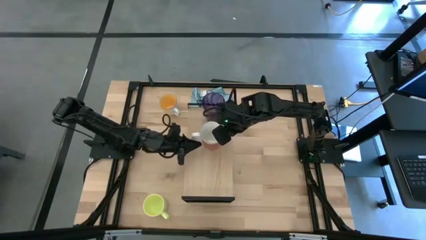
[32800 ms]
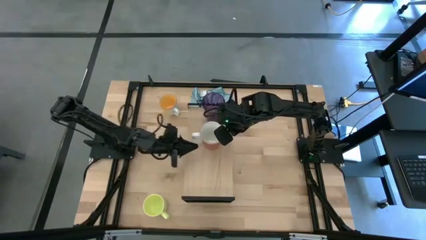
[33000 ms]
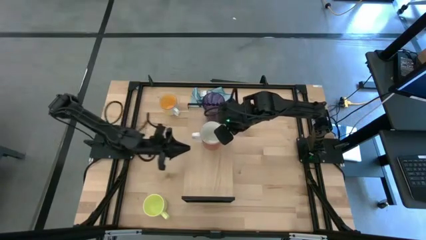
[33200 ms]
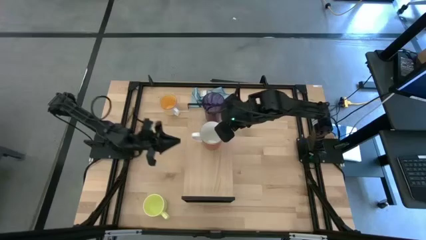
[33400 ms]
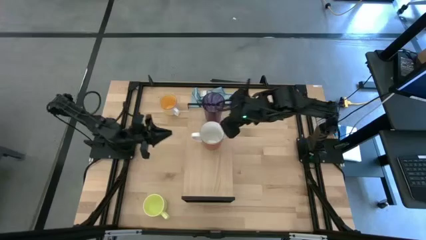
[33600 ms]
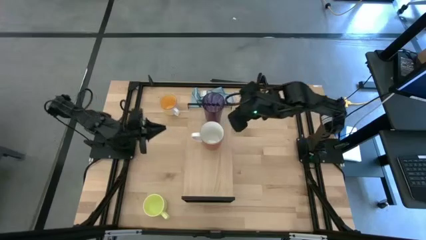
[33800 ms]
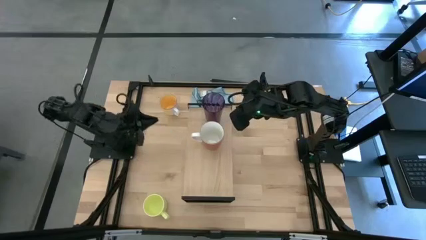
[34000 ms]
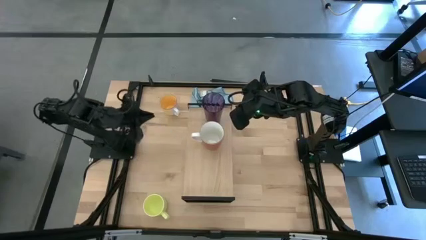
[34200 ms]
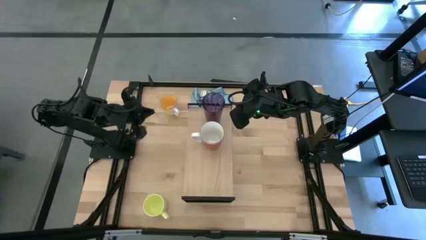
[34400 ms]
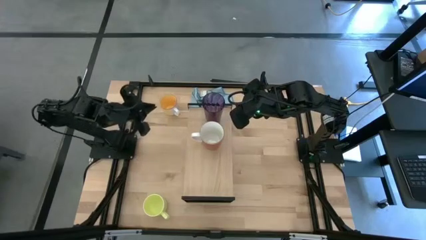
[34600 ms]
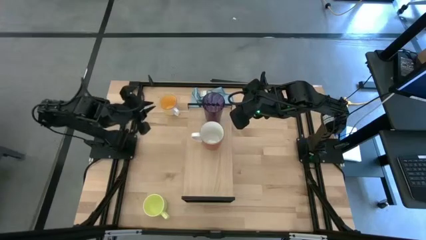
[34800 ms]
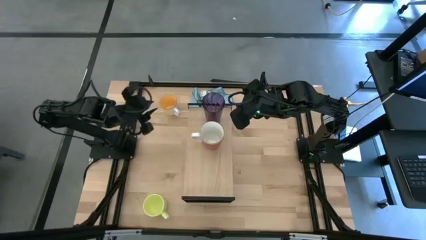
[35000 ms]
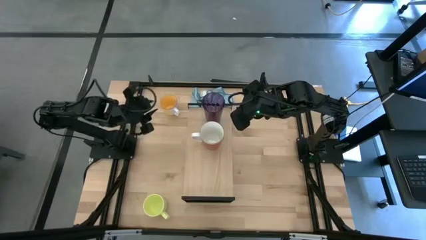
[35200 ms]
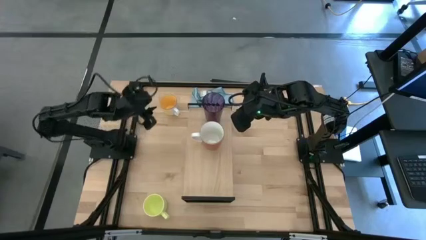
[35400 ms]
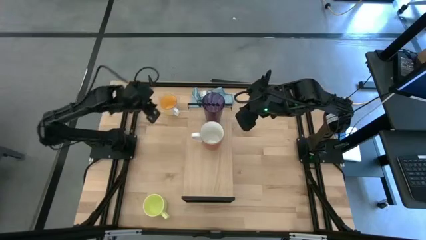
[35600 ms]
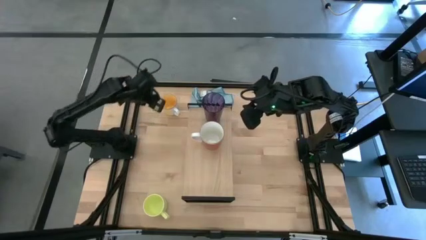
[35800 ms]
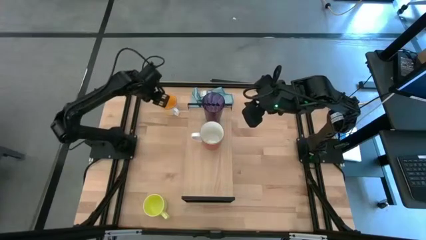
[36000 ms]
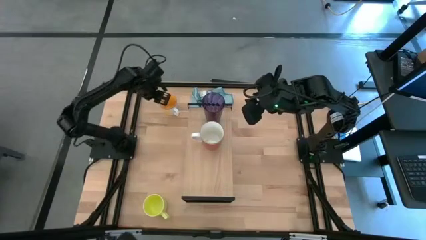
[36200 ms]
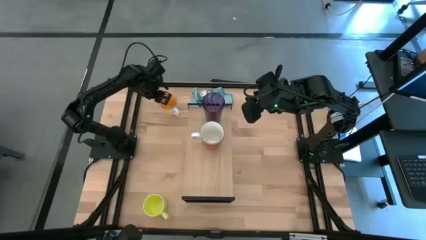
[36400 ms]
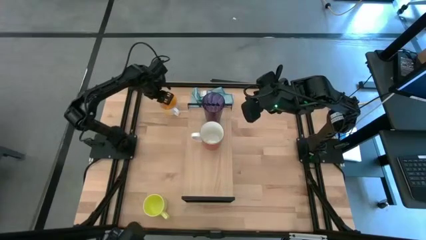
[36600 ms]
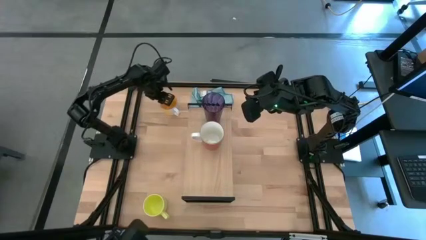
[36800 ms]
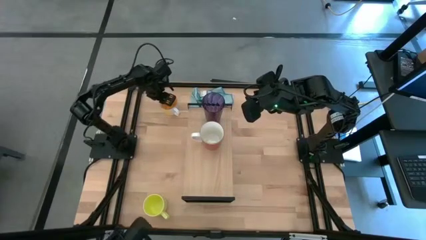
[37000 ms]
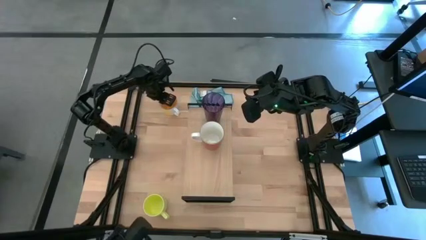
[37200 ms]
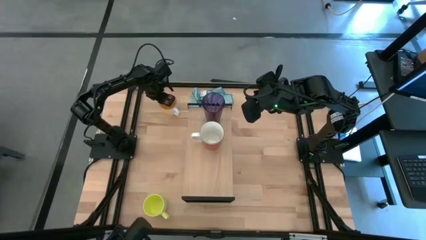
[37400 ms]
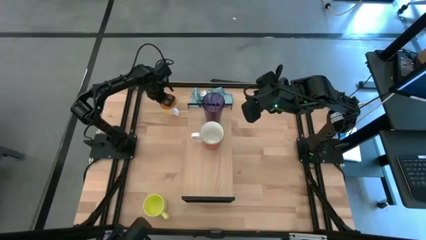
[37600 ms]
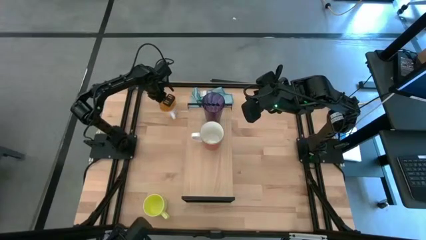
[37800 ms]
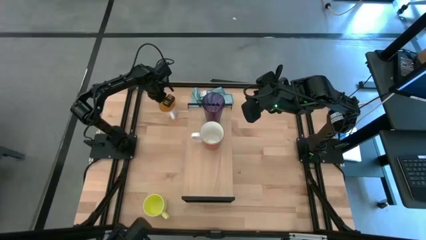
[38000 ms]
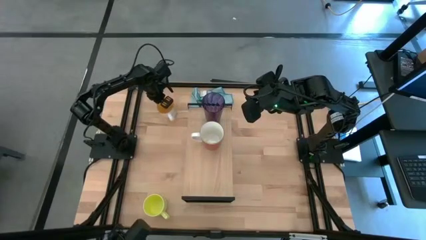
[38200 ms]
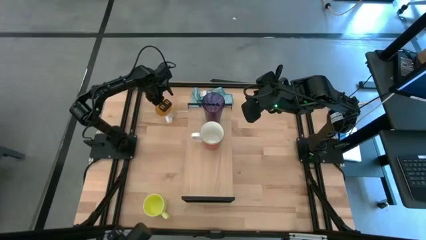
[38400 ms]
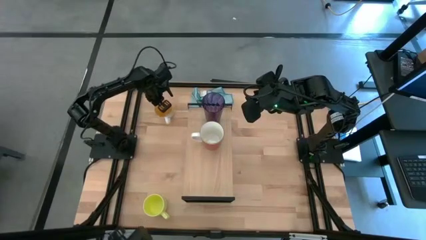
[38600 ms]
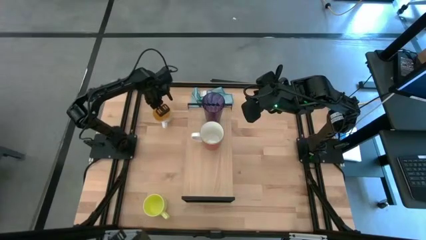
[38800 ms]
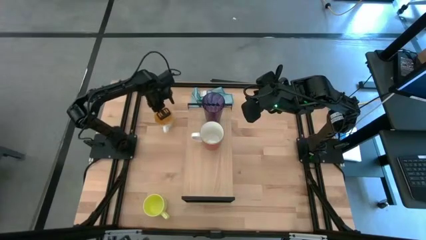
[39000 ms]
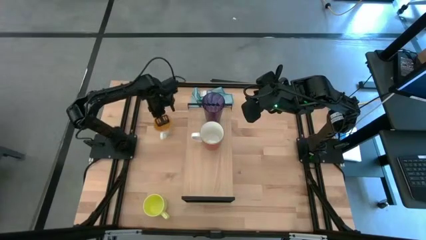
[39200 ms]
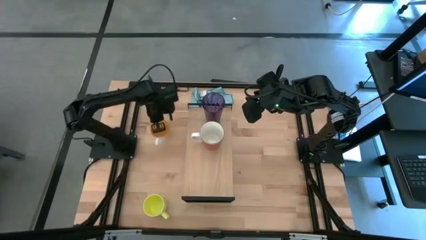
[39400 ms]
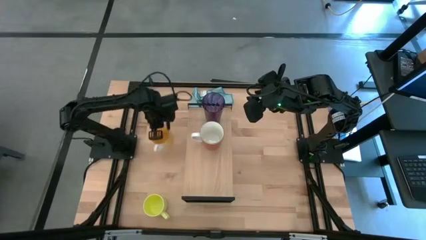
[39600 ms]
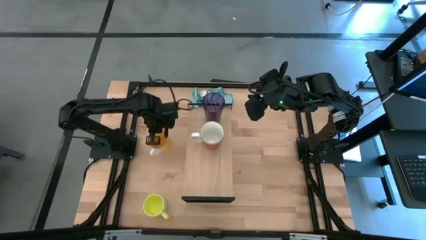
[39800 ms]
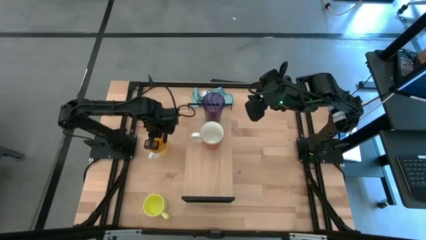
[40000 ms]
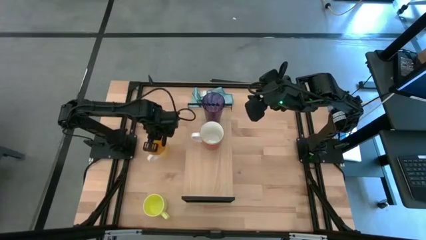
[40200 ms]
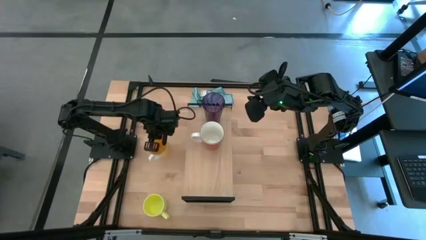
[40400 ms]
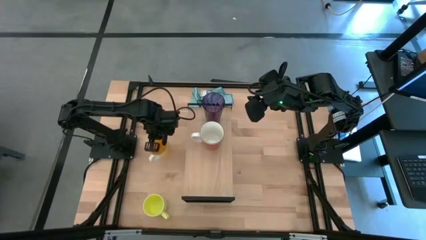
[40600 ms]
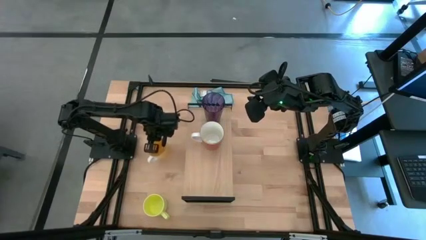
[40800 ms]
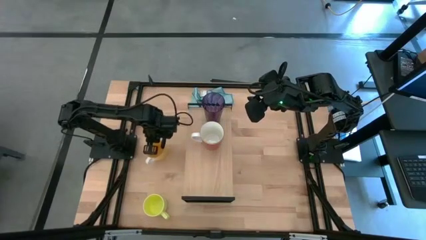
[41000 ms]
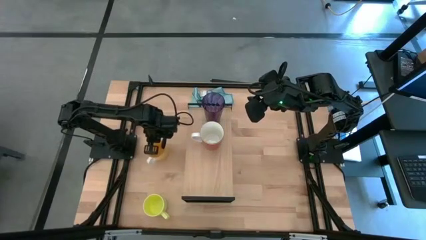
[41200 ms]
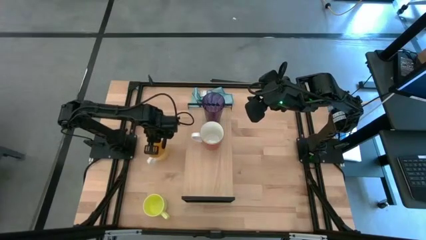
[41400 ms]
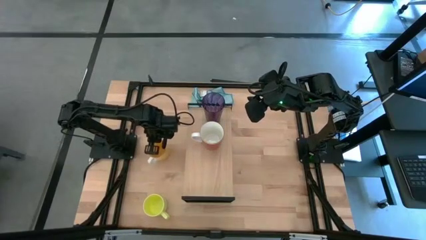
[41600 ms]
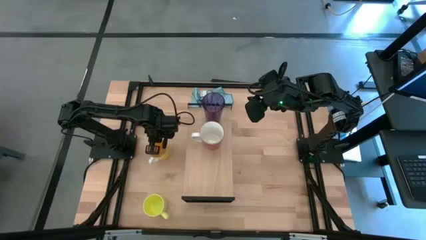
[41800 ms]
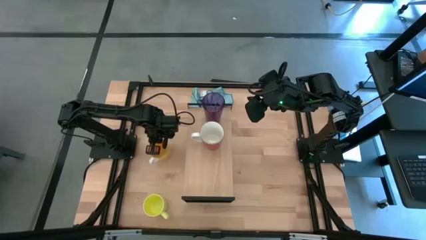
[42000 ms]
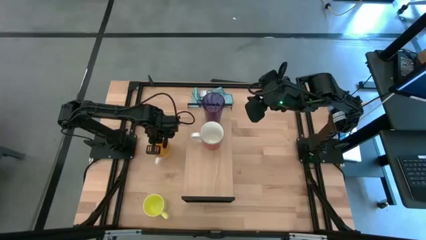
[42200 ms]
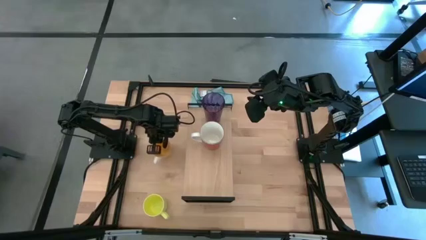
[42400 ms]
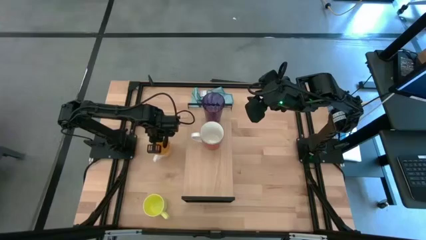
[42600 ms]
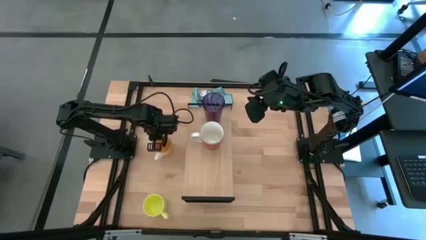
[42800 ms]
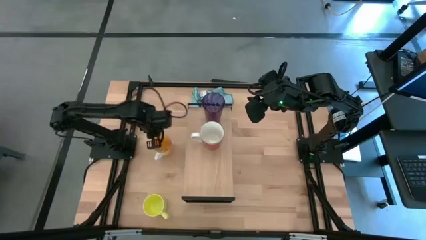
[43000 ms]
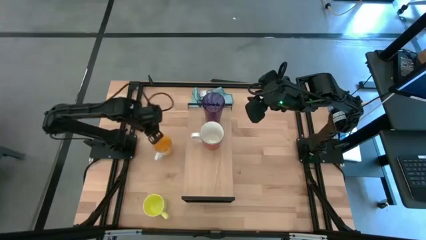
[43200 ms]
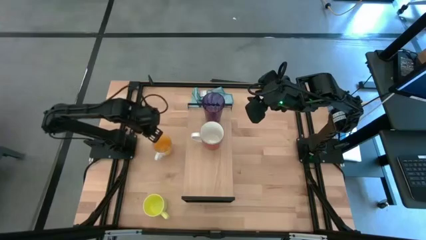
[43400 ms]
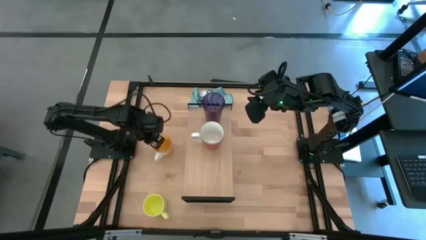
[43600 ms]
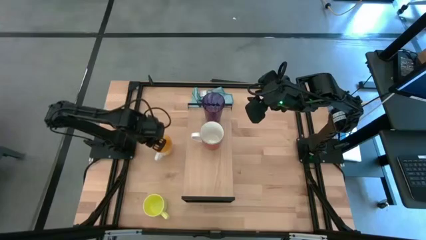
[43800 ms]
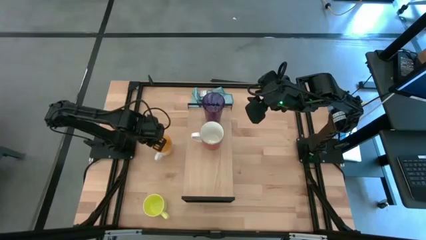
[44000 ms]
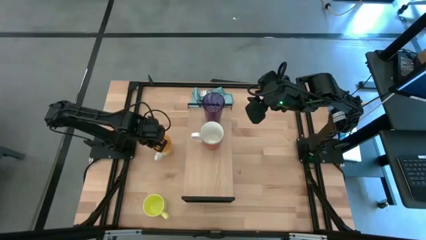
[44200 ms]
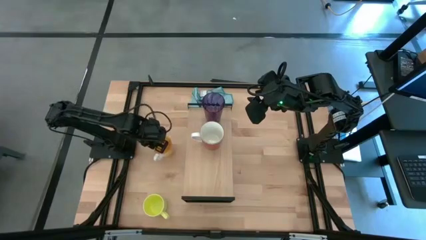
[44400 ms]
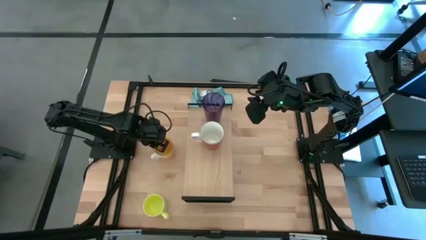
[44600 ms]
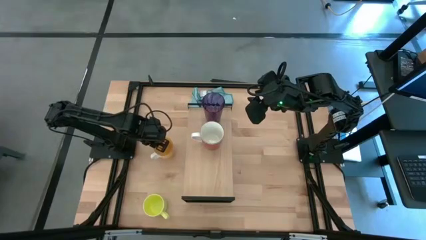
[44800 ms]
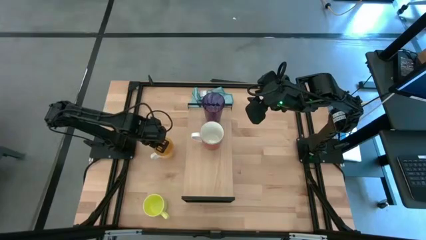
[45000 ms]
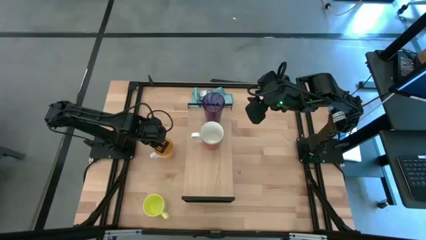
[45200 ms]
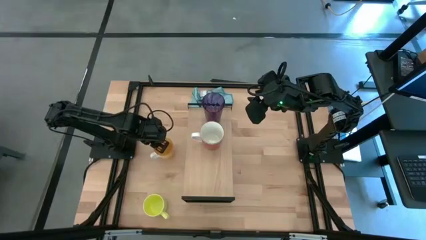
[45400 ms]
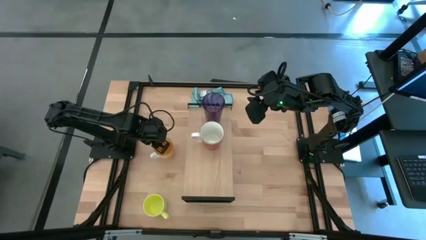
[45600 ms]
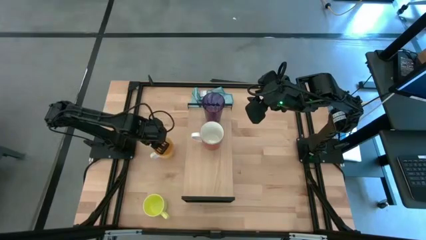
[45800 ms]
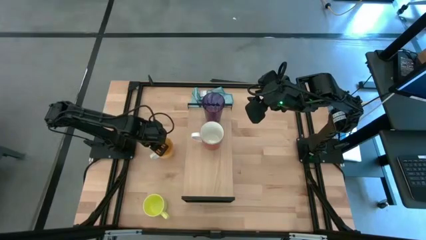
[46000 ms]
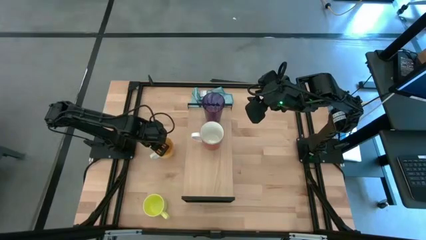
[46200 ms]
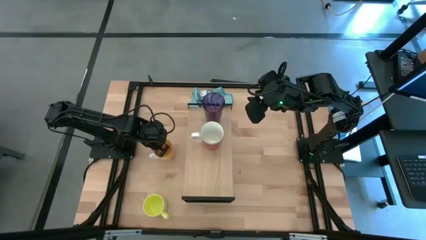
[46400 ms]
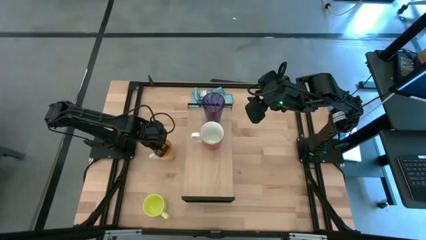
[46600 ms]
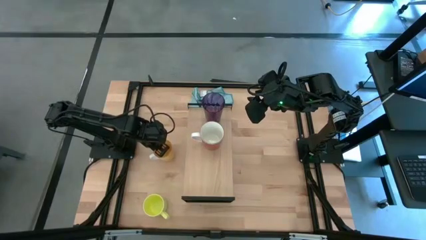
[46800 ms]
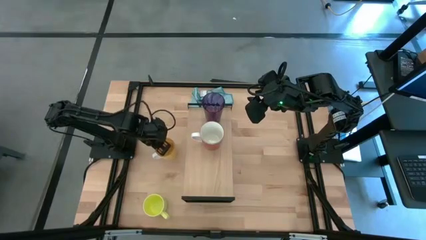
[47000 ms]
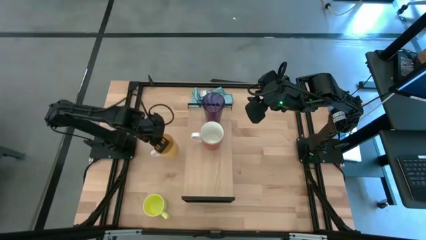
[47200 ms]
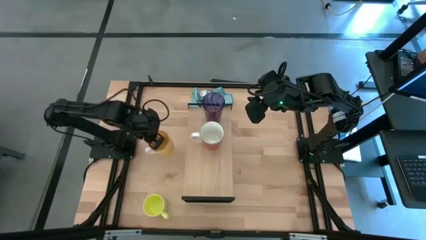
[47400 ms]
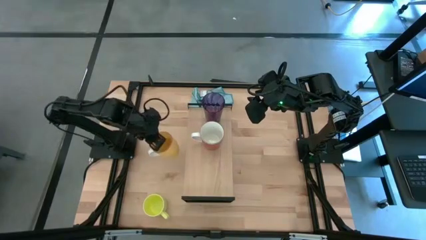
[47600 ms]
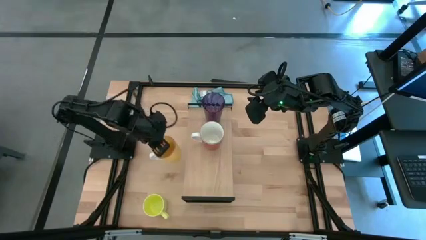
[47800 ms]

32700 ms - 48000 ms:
Task: Stack small to large cups/mugs on shelf
Put the yellow cup on the shelf
